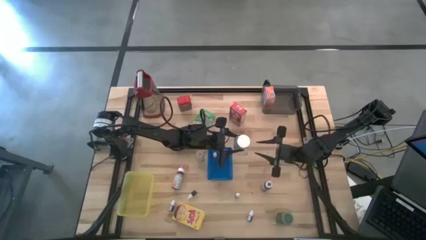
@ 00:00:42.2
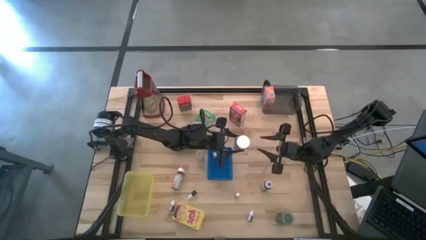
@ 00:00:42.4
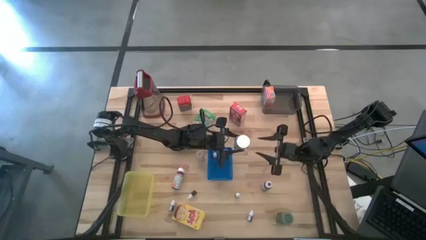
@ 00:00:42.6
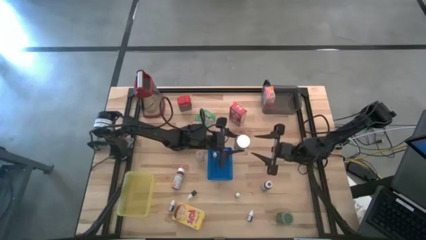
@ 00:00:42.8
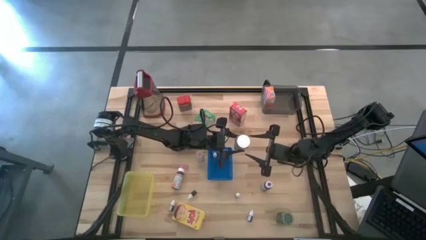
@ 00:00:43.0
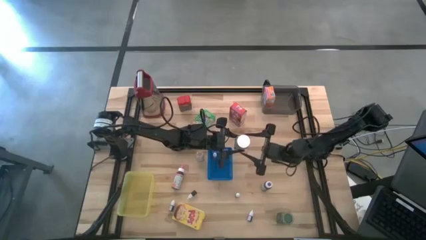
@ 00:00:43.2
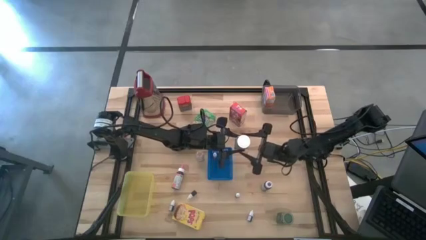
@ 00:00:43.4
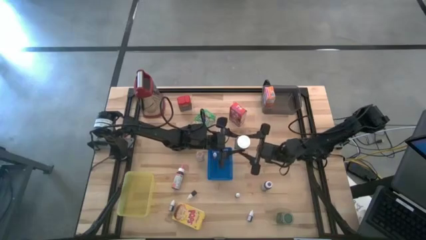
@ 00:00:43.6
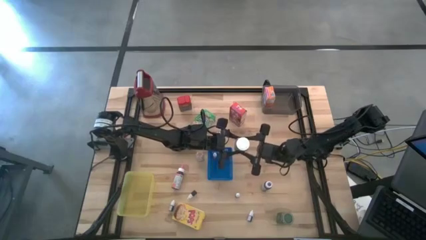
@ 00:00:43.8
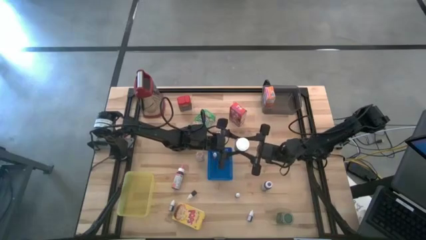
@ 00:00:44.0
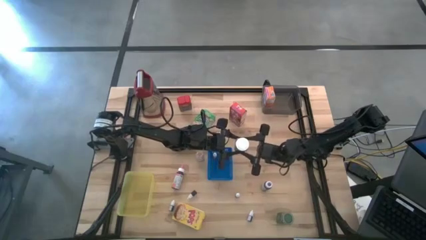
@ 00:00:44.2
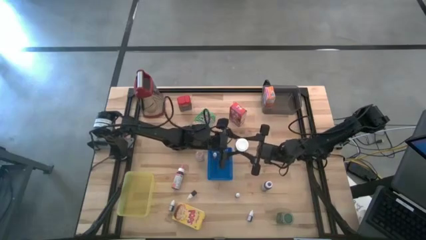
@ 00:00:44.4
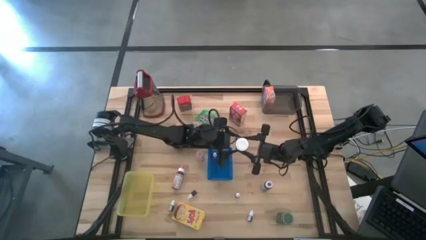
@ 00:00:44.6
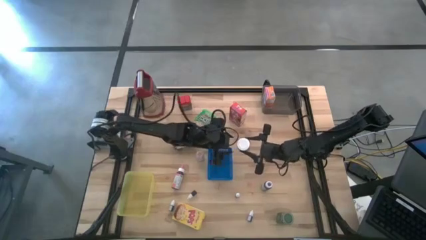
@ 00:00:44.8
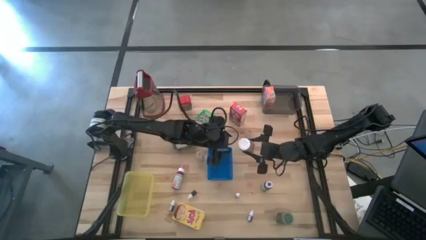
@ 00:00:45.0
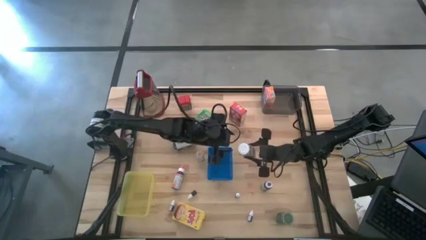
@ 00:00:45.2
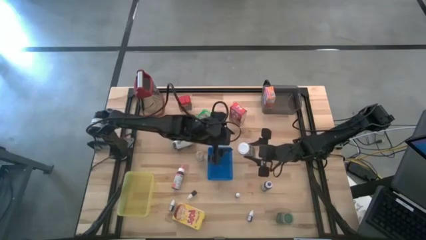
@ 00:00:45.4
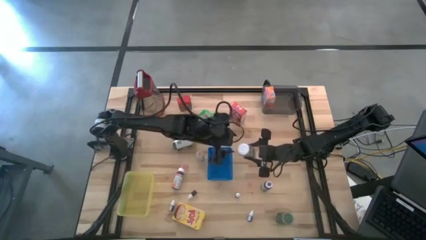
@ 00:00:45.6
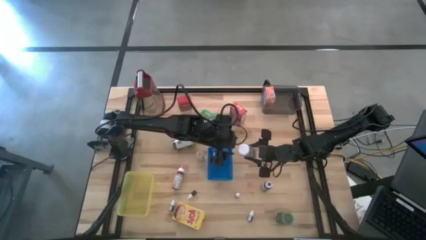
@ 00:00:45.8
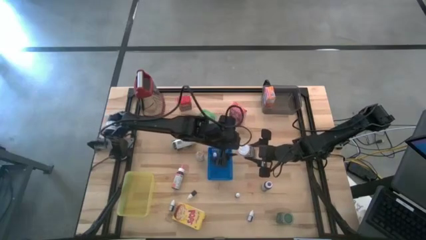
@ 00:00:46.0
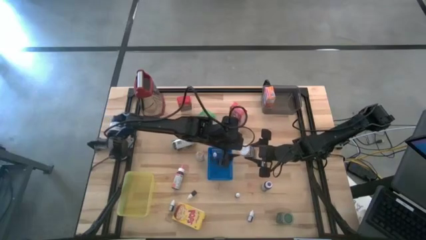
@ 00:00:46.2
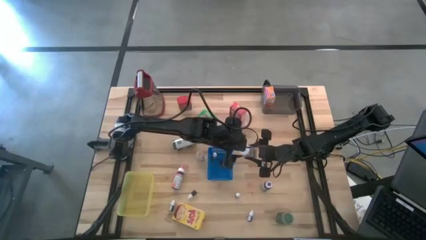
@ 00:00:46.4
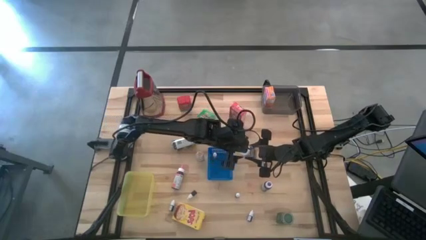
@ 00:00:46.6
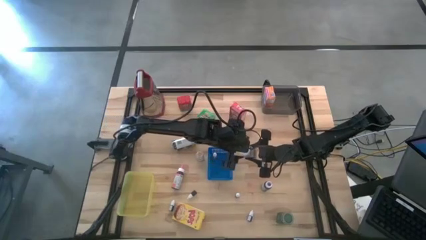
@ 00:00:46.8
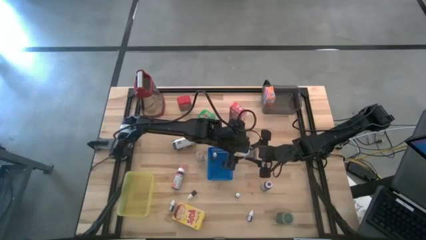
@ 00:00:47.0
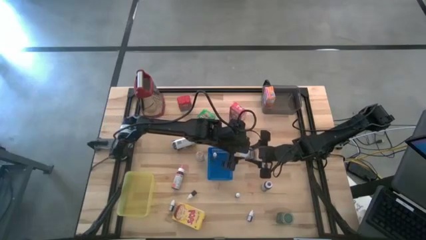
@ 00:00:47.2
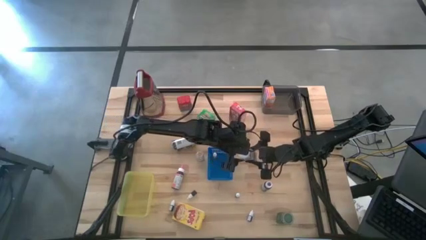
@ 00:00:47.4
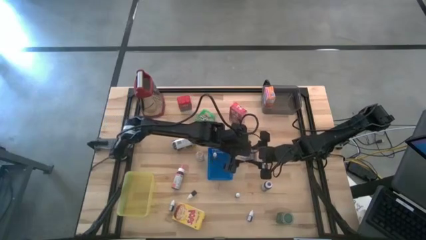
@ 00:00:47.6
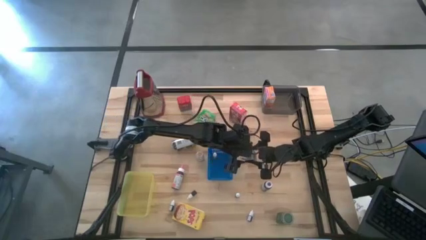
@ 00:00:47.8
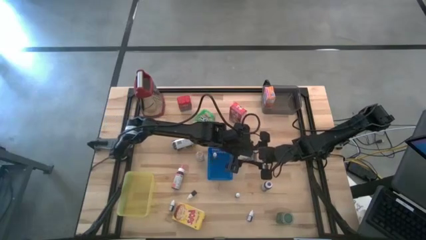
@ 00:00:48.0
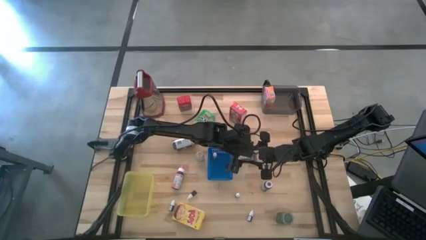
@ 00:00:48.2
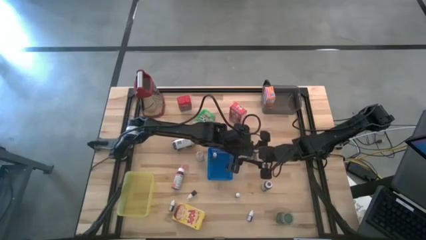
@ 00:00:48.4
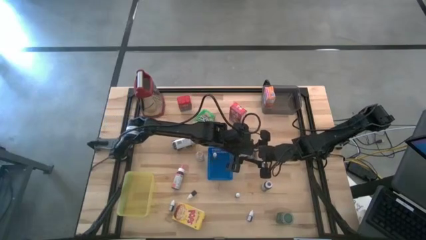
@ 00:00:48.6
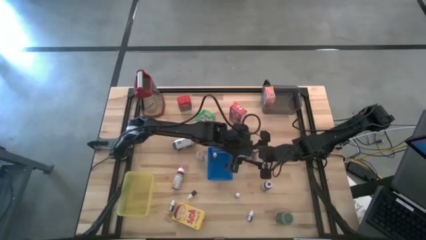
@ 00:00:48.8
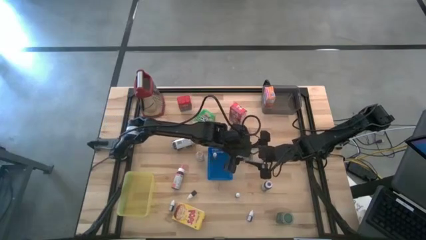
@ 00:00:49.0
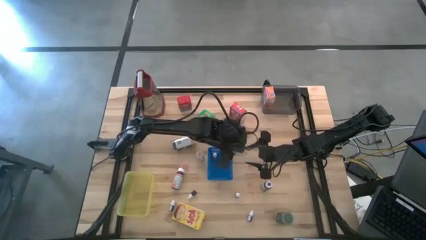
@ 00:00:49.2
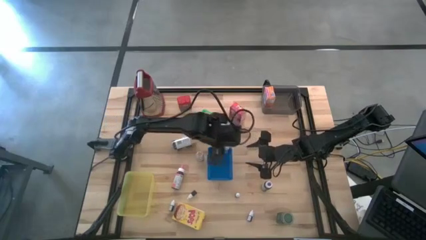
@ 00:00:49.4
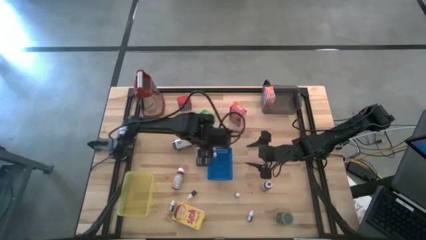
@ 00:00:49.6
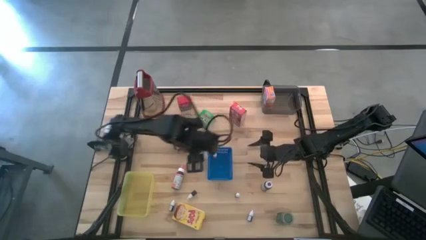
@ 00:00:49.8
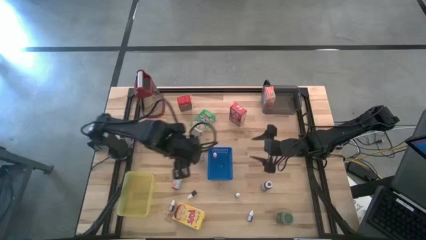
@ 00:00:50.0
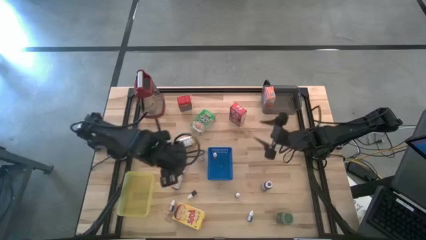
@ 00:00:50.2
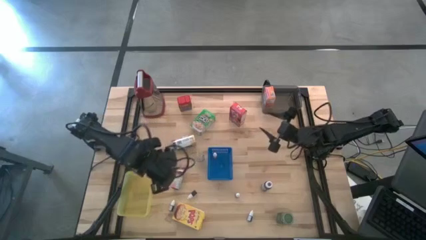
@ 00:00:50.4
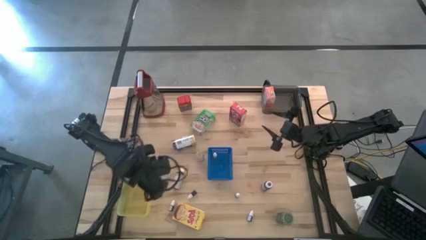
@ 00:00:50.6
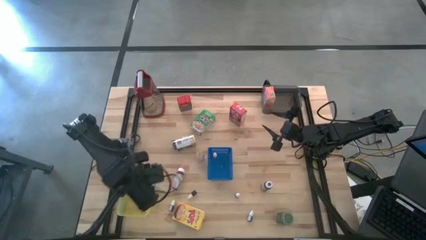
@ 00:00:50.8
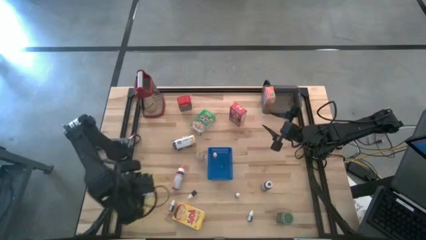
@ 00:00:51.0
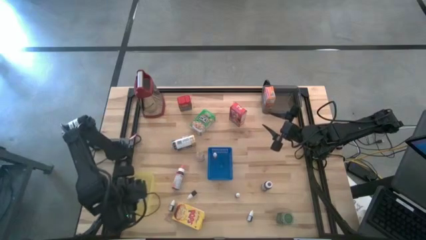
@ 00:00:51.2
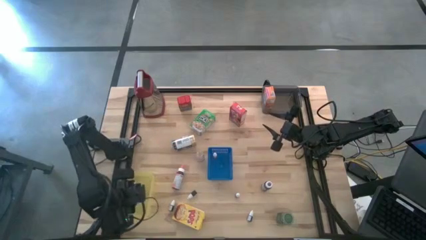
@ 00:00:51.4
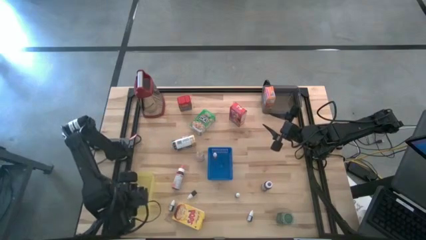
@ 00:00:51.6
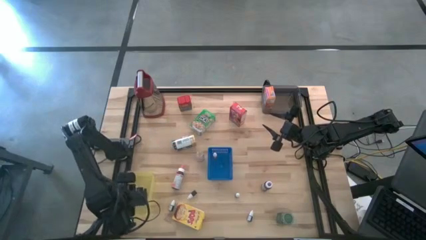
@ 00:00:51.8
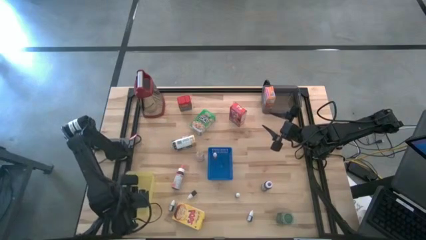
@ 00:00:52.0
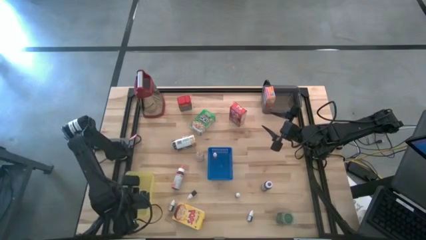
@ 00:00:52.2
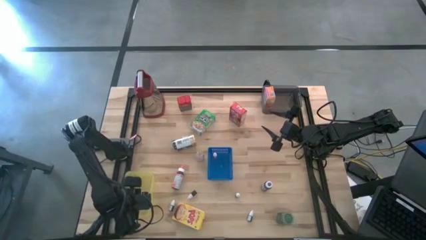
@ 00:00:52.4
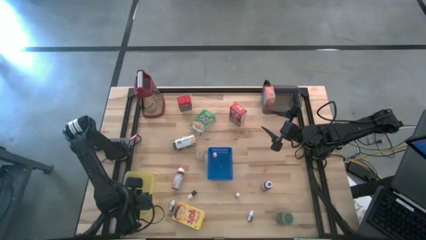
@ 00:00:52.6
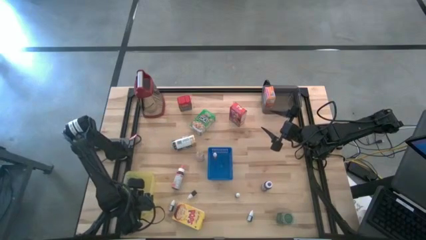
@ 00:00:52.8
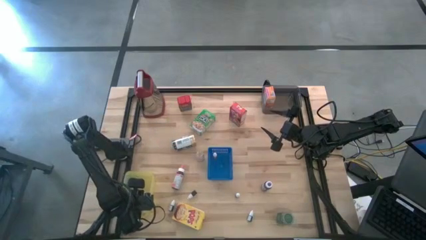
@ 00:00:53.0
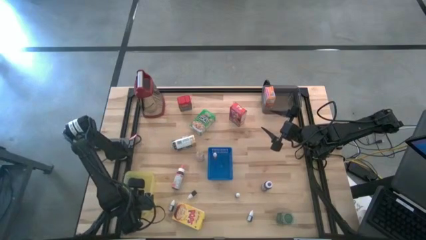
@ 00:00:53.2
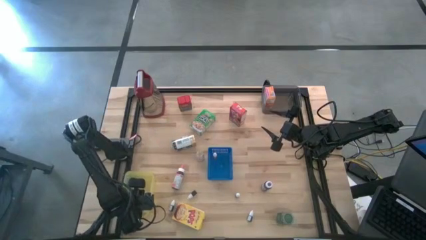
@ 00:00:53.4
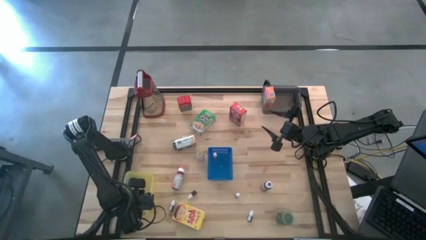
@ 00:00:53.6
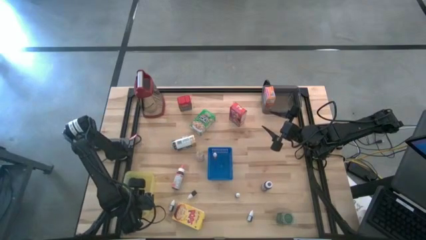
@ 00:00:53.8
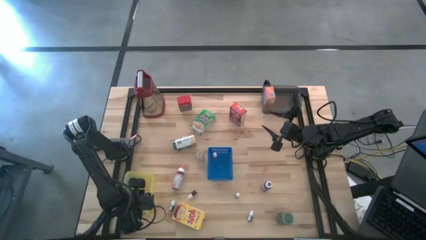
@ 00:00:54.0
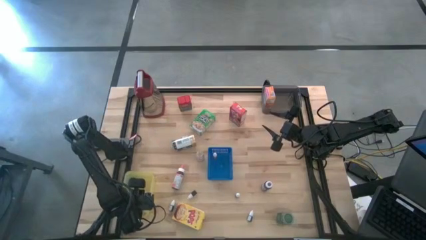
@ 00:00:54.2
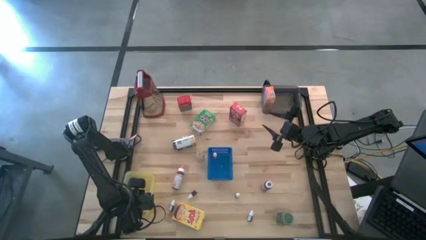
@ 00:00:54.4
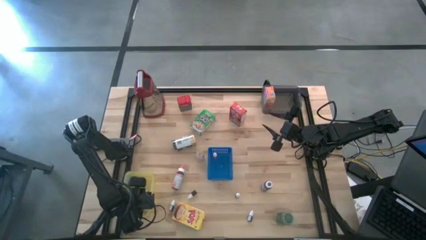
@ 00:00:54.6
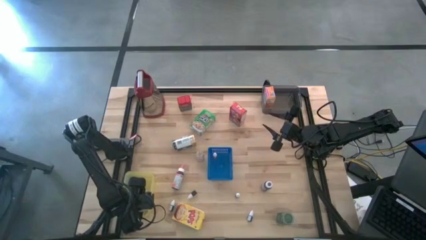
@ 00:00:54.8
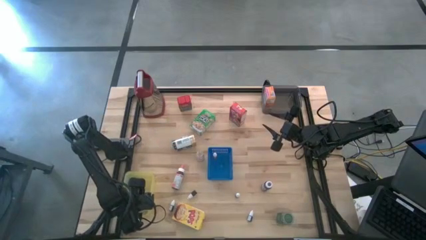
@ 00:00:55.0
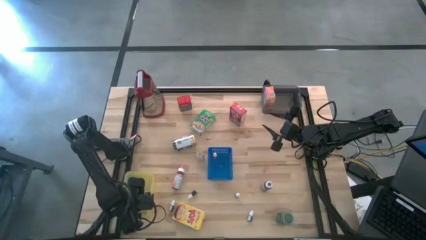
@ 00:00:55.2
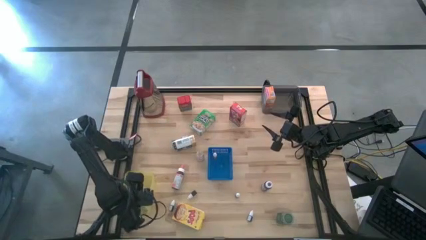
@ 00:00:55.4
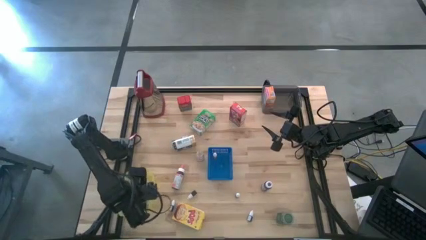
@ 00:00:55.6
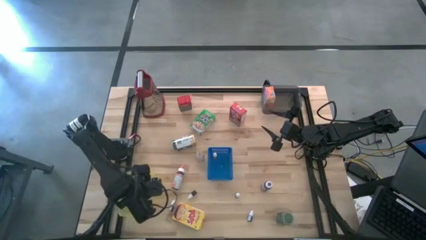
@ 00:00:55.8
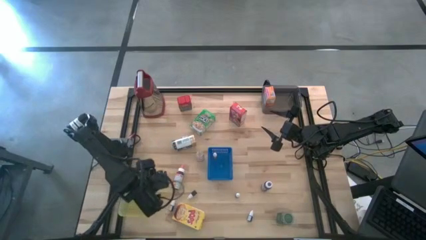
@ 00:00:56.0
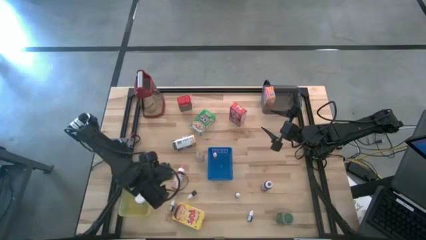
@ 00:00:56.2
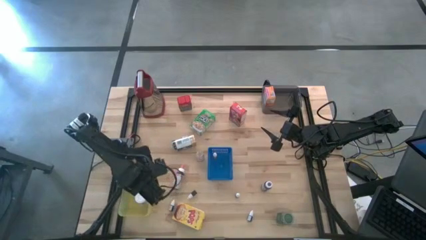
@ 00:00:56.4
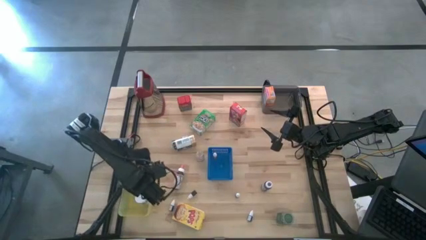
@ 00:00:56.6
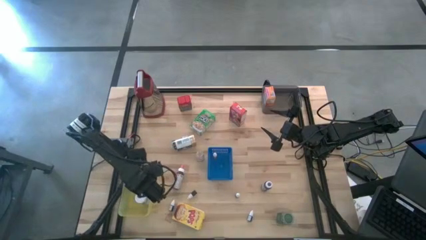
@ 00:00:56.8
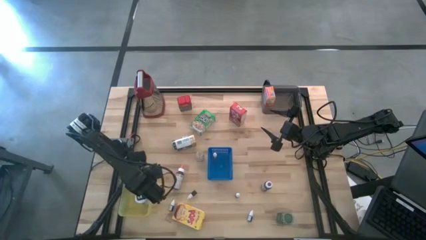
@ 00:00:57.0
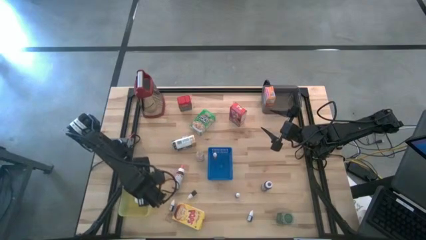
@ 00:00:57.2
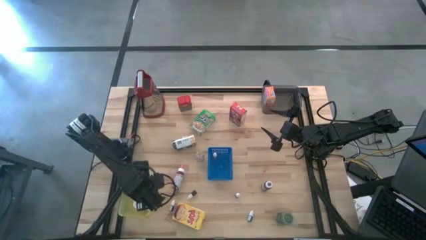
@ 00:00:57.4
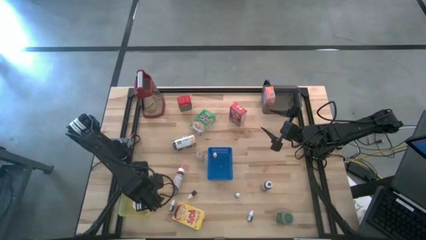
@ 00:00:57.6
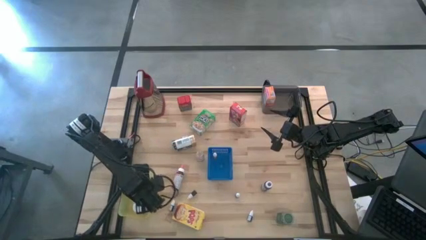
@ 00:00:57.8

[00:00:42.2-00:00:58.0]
Task: Pick & Place Kitchen Items
Put the white seasoning bottle into the yellow bin
